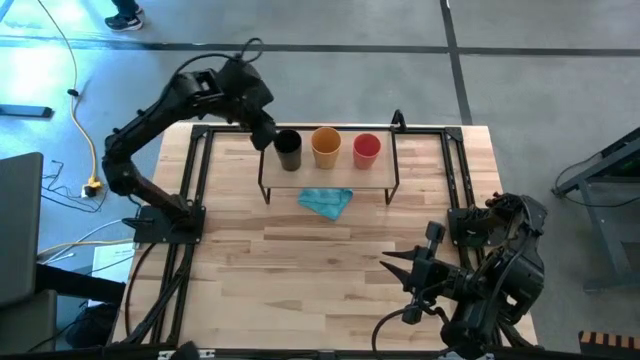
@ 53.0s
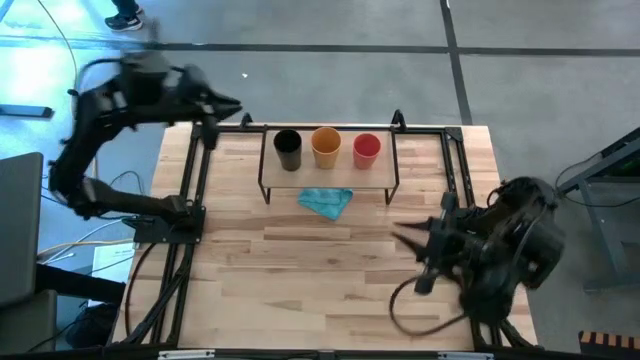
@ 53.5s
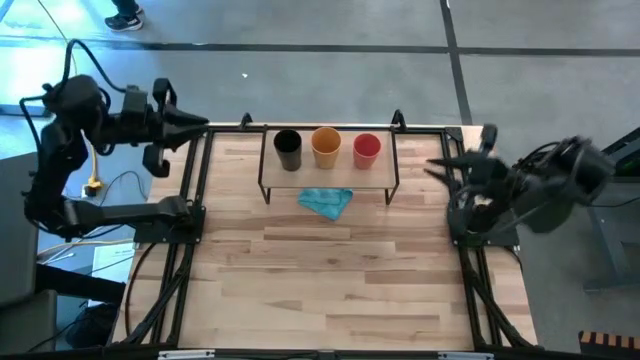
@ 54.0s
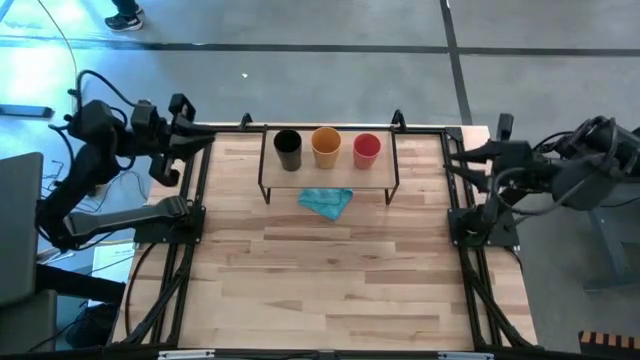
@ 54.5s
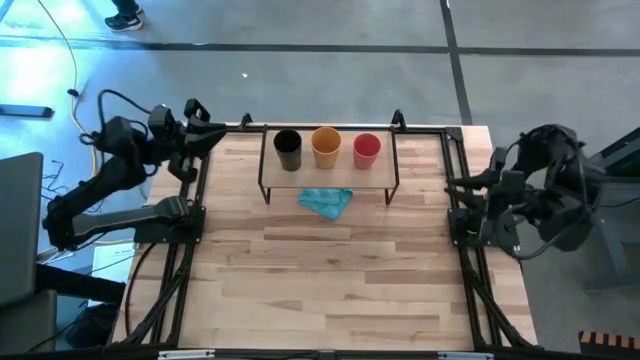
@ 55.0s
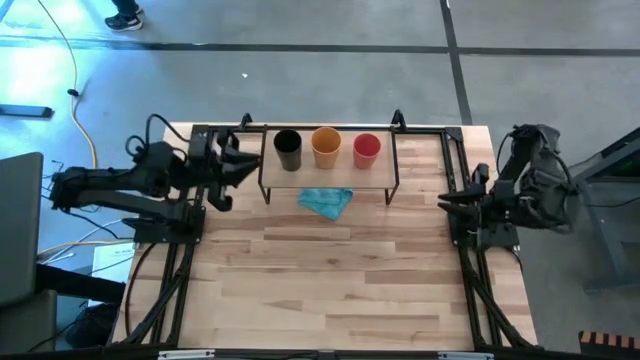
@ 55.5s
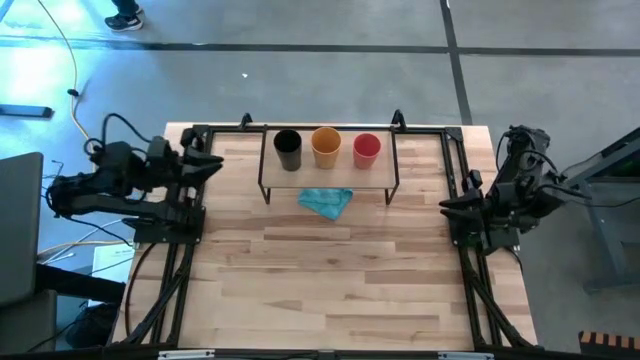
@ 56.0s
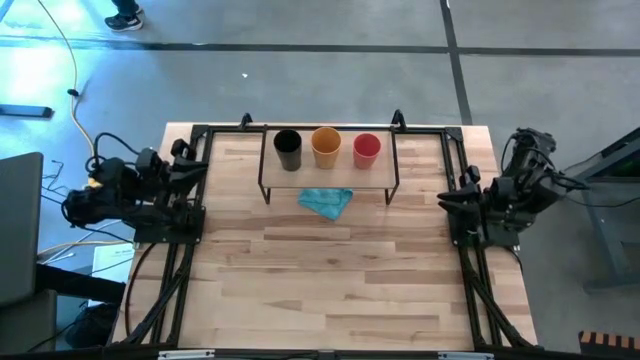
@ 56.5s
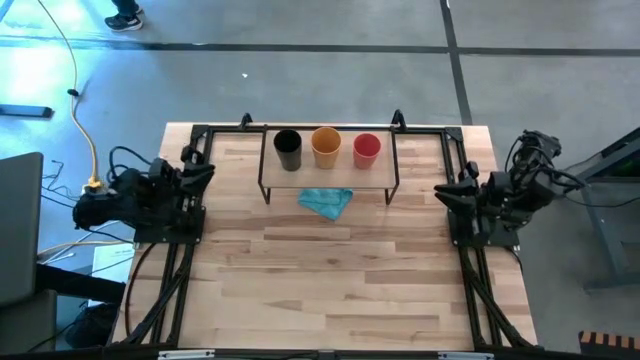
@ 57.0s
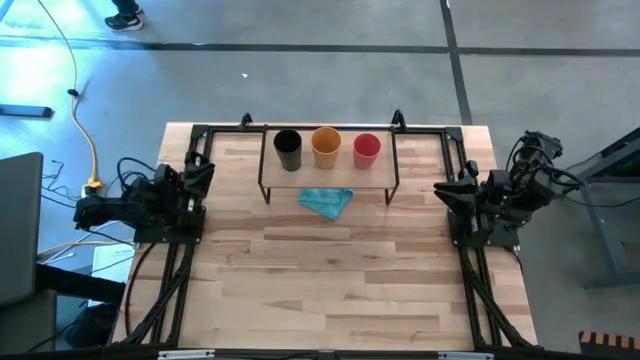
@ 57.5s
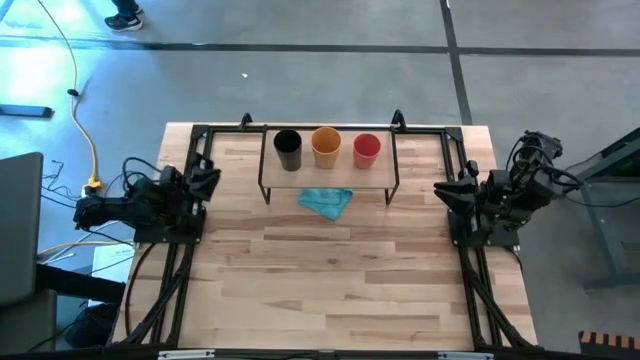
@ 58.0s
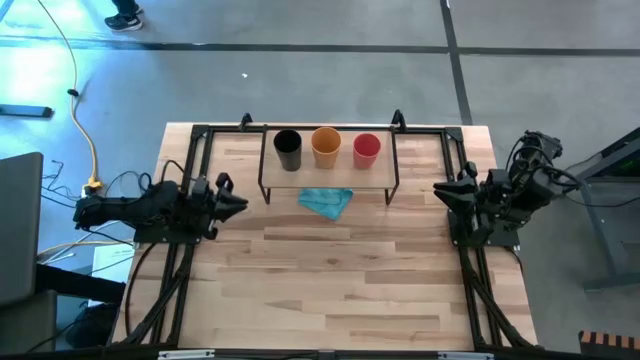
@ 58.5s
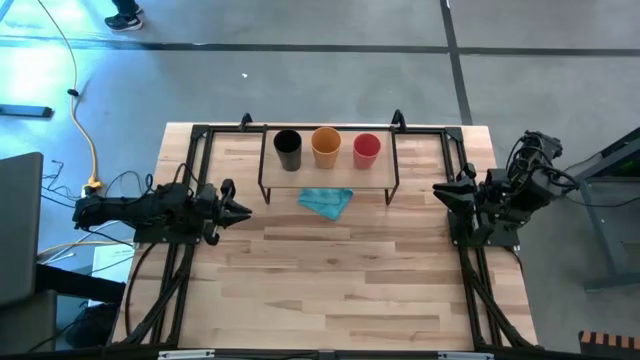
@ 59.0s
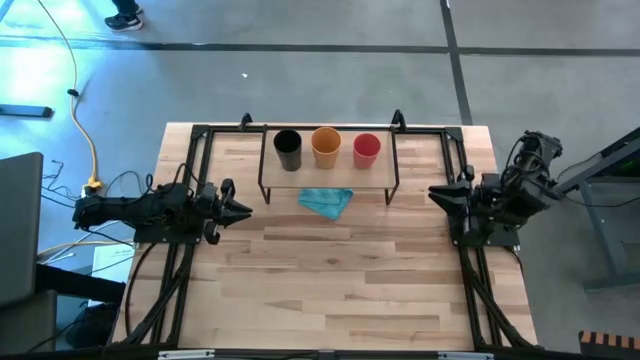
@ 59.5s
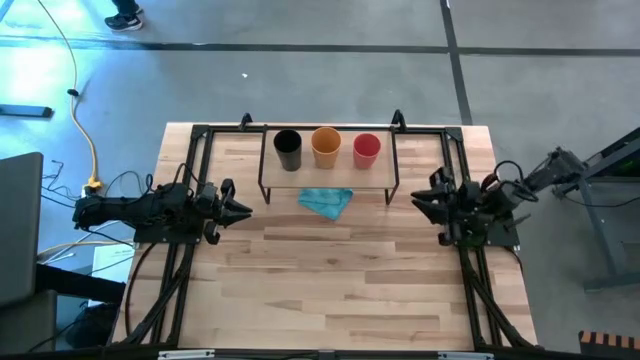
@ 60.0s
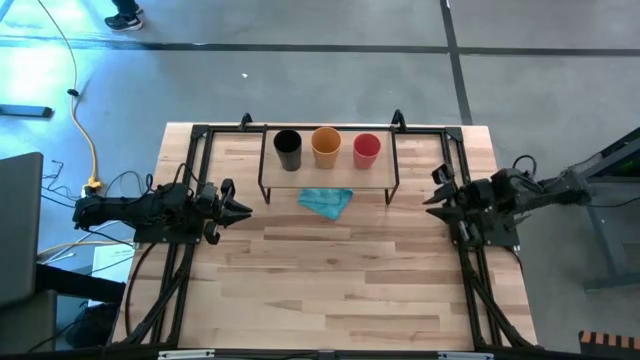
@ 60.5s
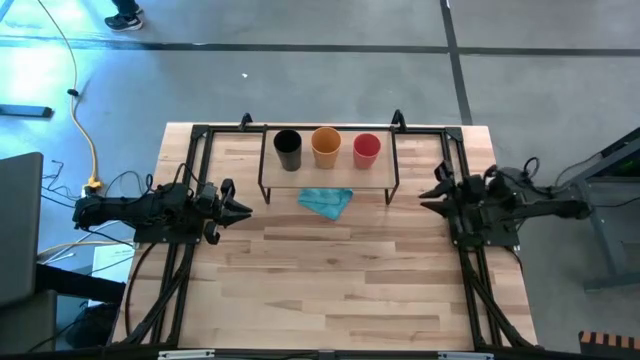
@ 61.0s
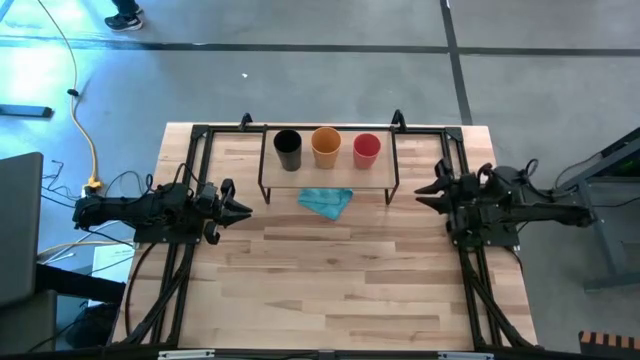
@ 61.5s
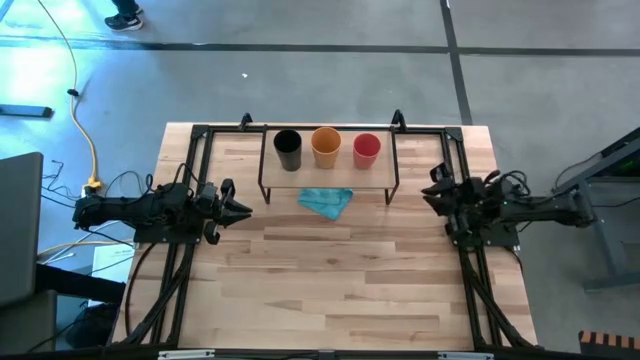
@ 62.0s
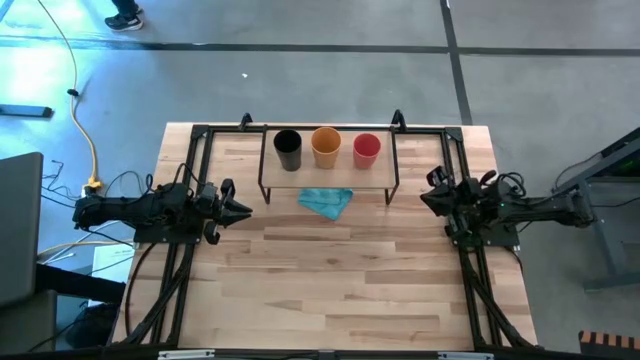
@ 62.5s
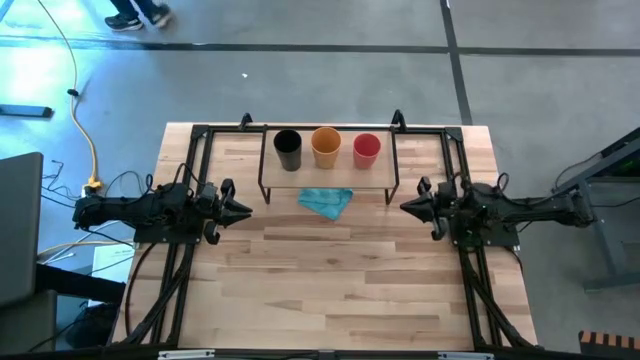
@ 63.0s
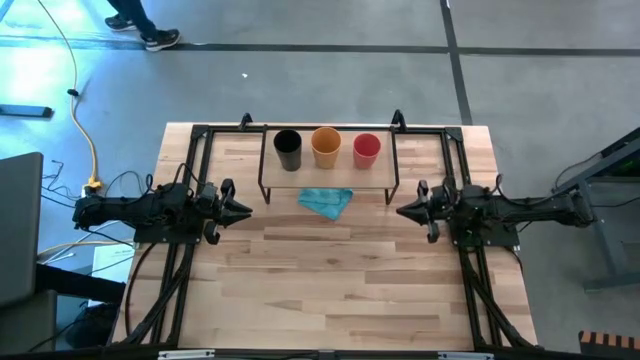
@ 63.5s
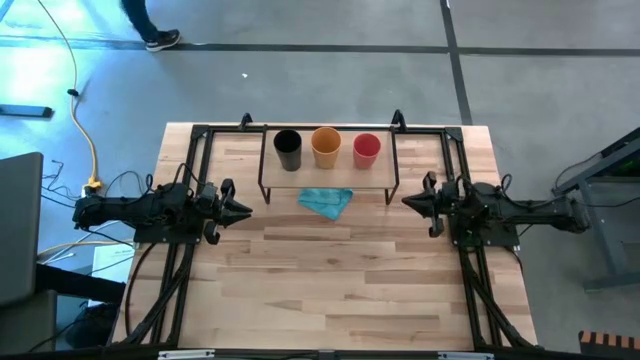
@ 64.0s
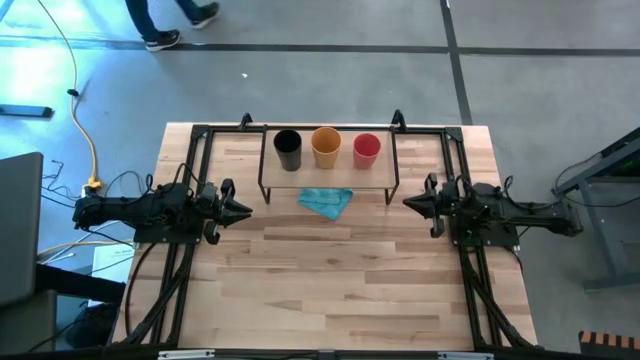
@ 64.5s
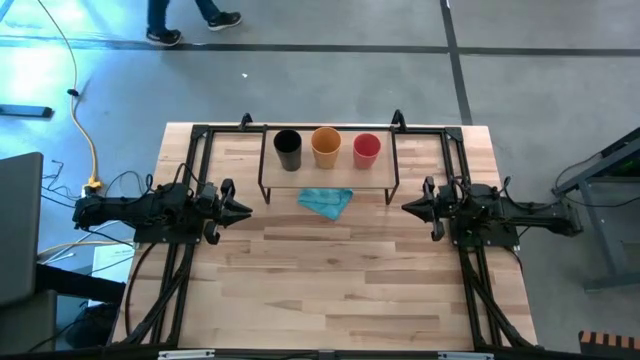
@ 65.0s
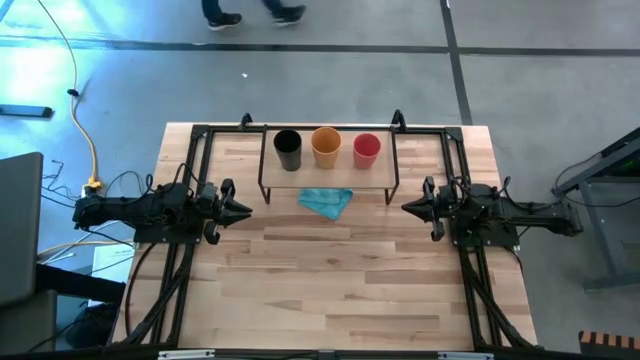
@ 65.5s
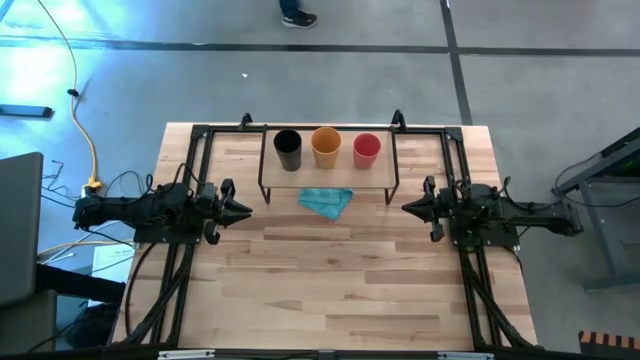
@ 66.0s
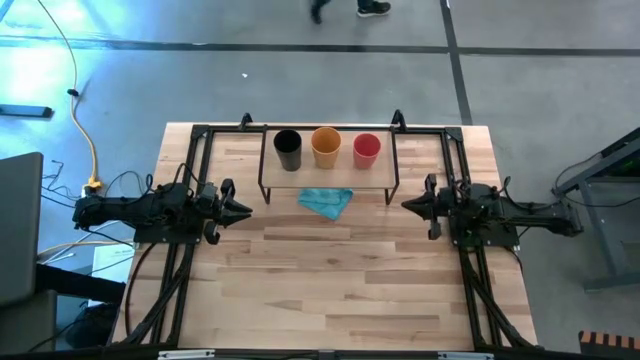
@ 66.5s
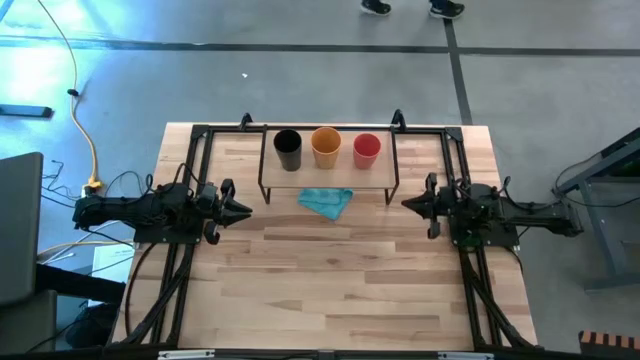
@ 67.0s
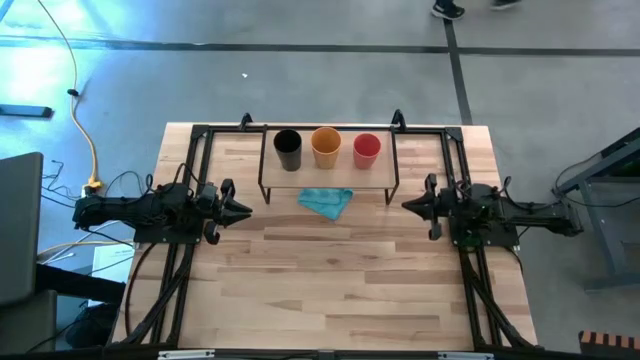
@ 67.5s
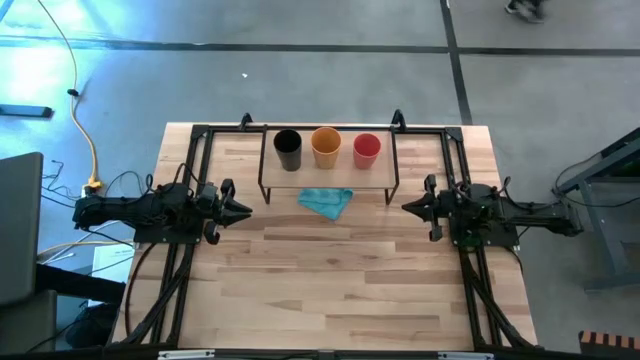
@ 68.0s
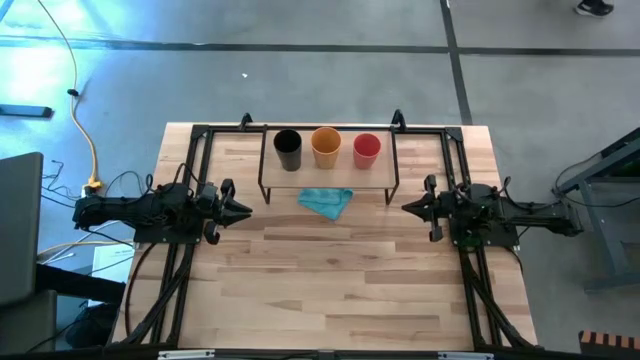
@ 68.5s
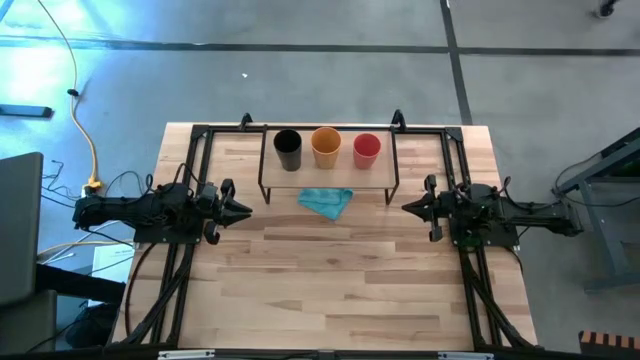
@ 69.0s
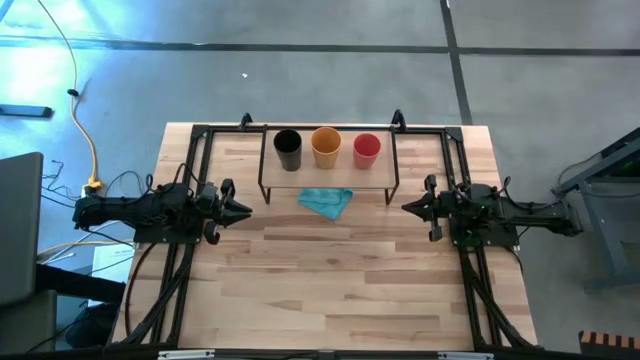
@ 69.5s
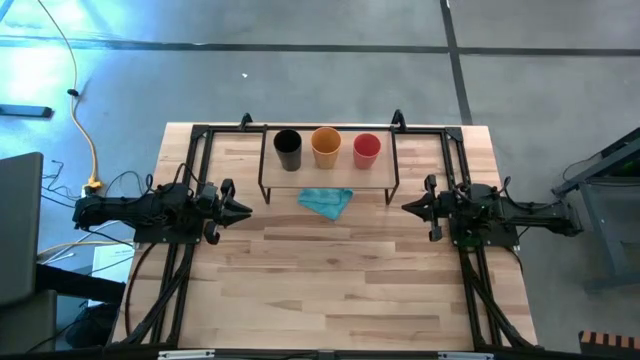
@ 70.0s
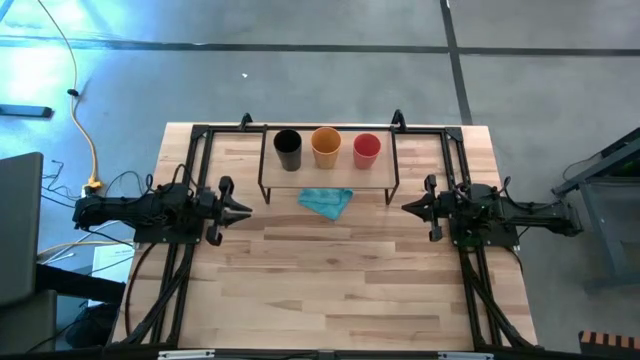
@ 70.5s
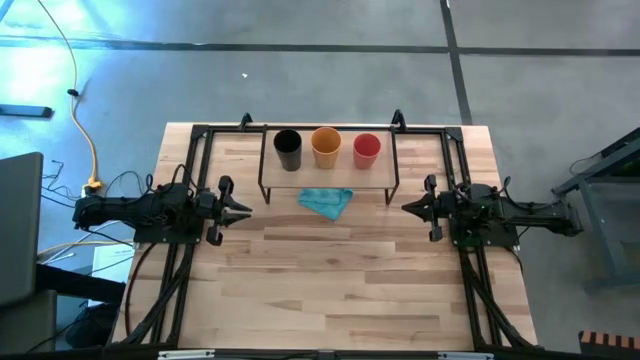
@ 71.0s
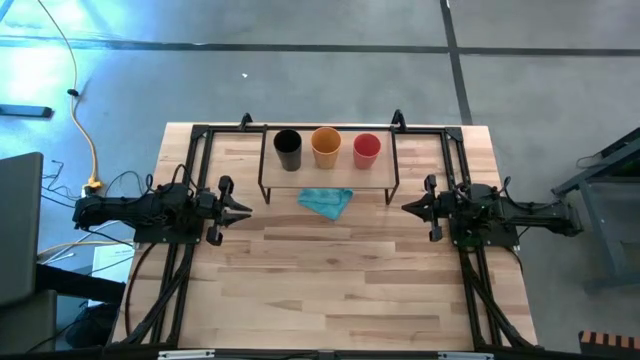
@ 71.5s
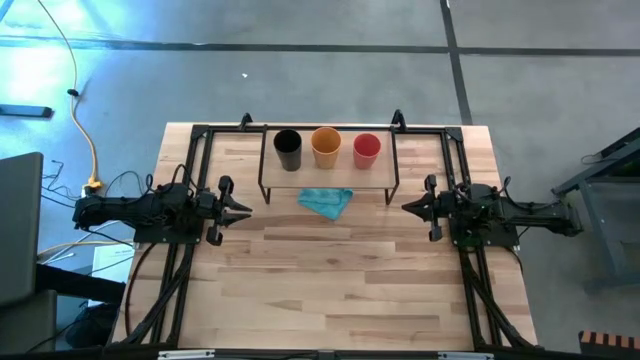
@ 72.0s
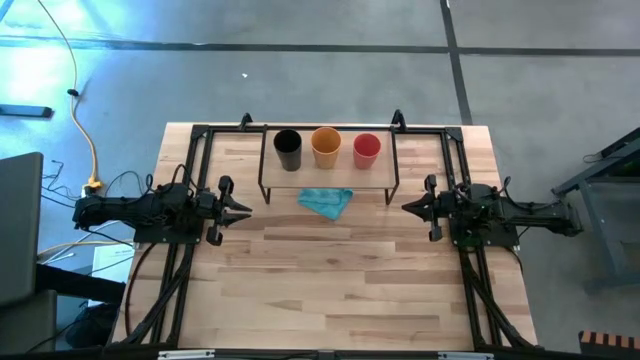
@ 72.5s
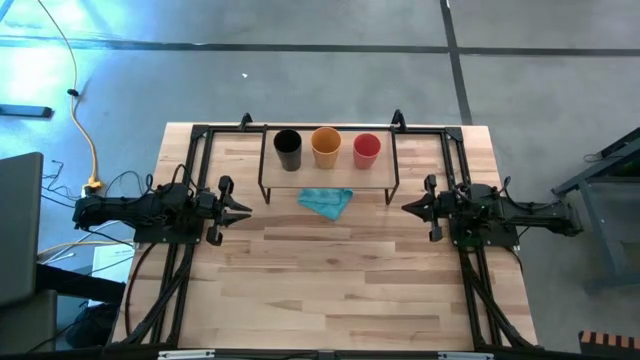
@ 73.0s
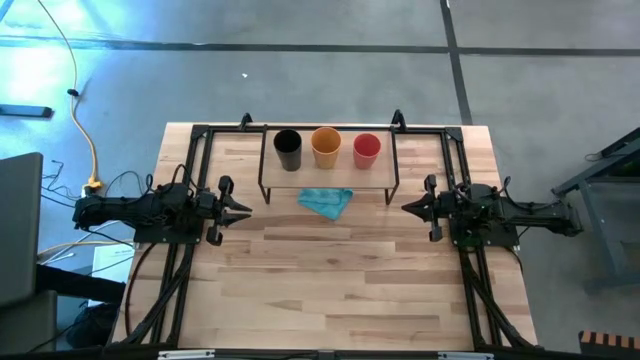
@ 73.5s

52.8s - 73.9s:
Task: Stack small to large cups/mugs on shelf
Return to Home Position

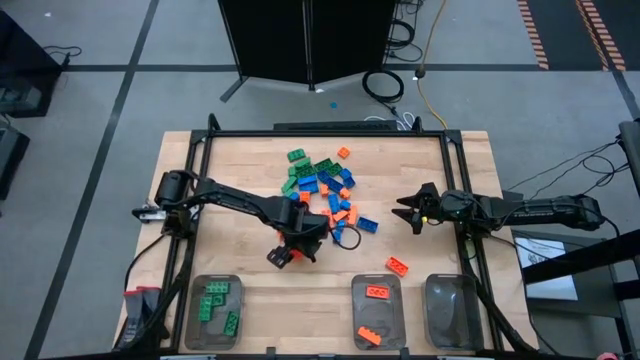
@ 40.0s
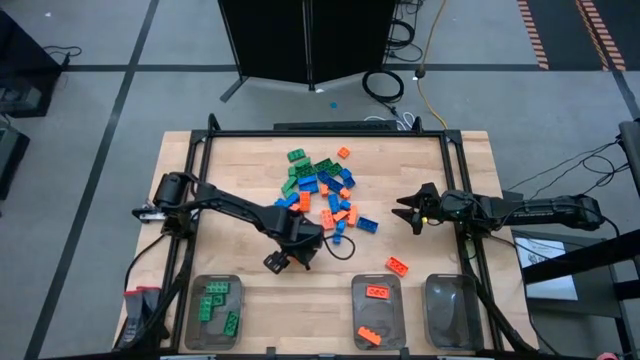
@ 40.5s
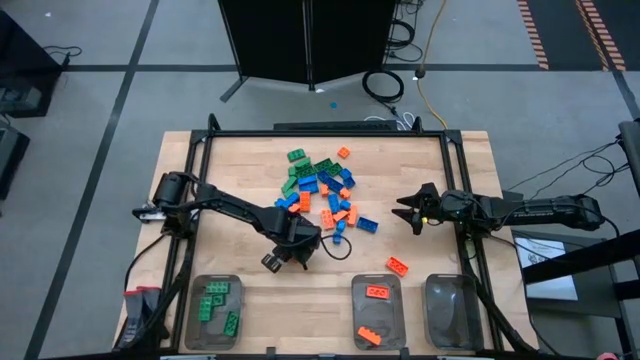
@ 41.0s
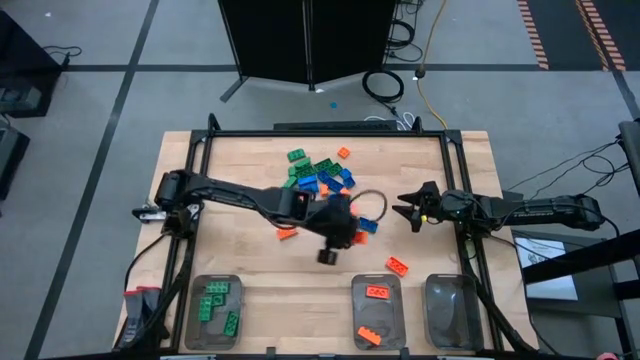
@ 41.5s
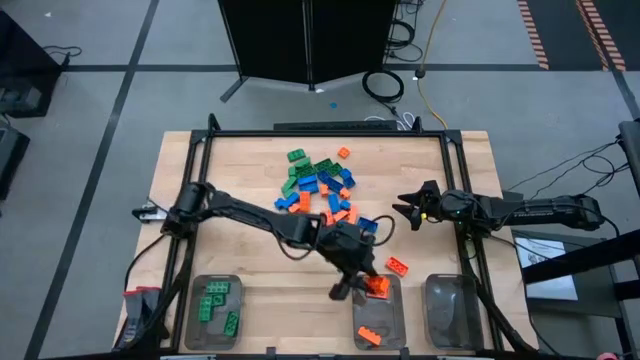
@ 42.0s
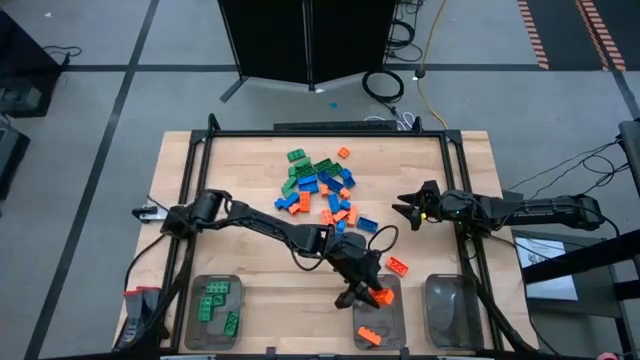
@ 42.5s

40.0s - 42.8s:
Task: Sort blocks
Put the orange game piece into the center black bin
